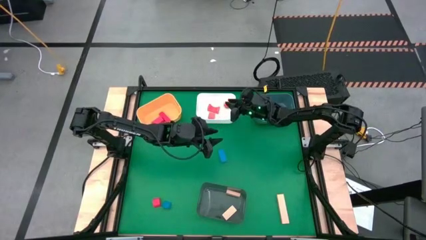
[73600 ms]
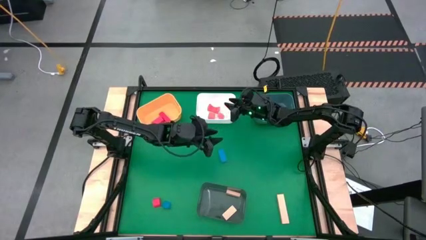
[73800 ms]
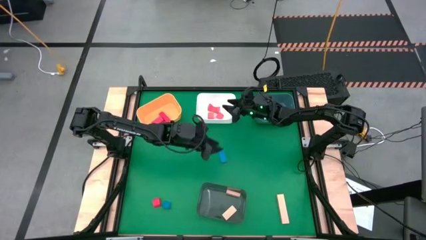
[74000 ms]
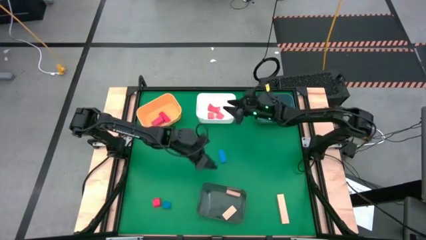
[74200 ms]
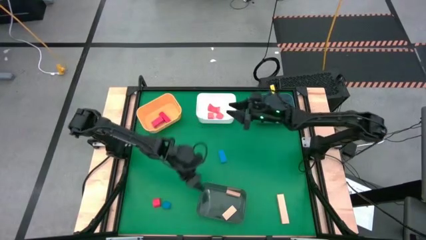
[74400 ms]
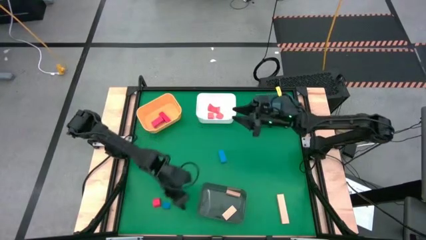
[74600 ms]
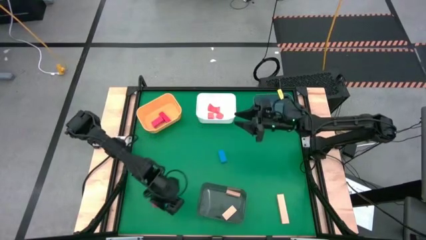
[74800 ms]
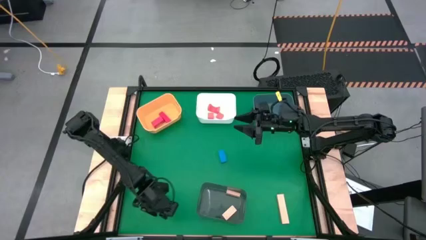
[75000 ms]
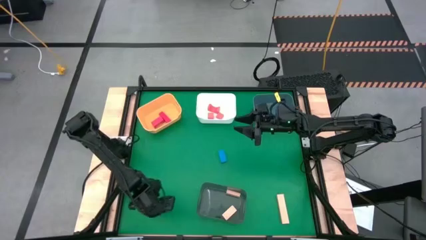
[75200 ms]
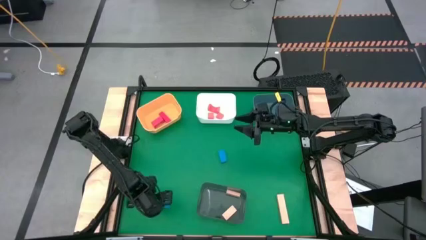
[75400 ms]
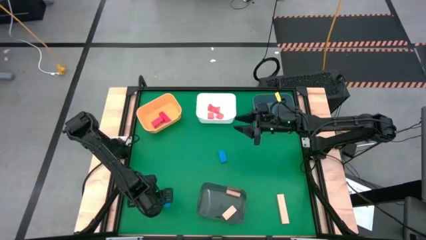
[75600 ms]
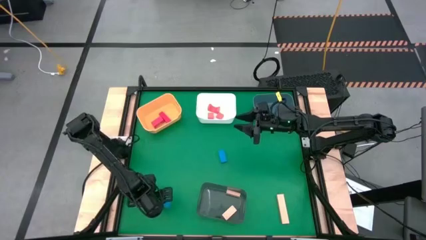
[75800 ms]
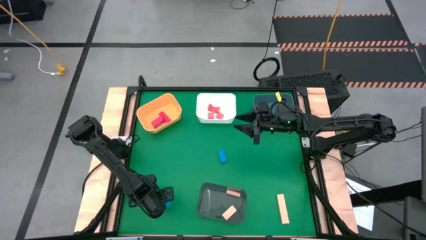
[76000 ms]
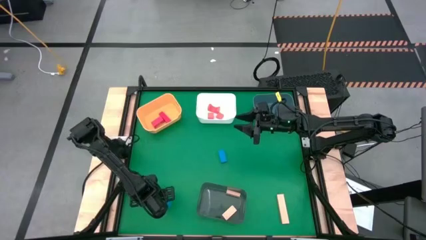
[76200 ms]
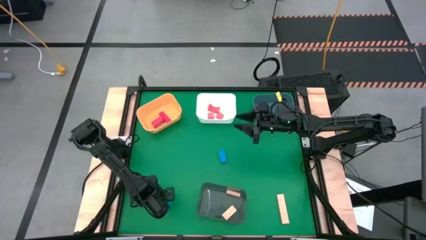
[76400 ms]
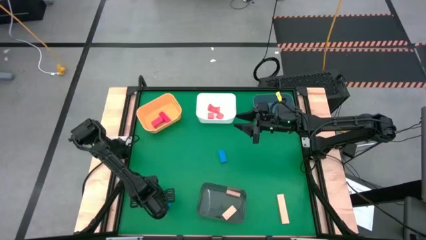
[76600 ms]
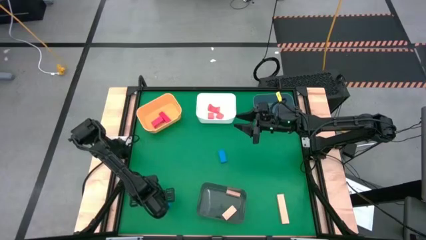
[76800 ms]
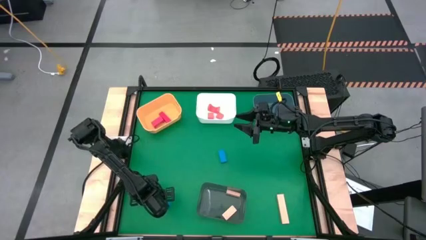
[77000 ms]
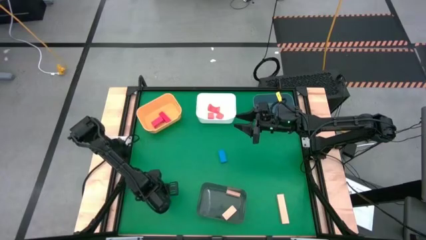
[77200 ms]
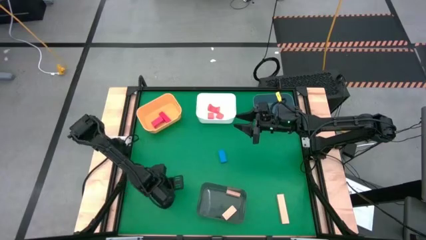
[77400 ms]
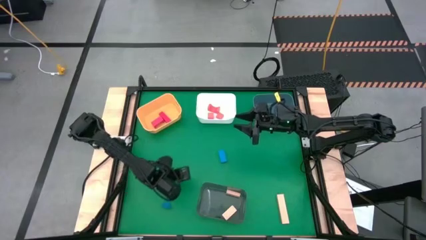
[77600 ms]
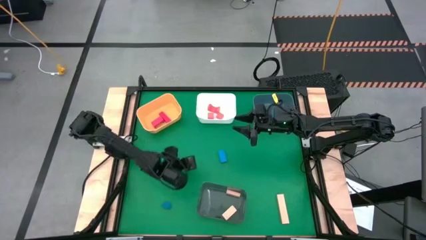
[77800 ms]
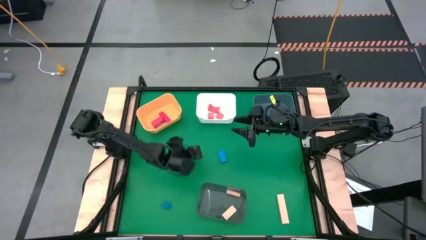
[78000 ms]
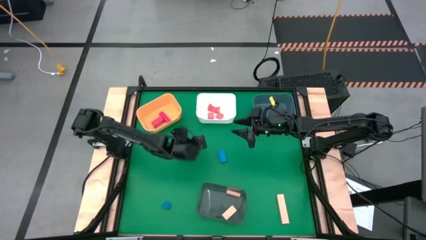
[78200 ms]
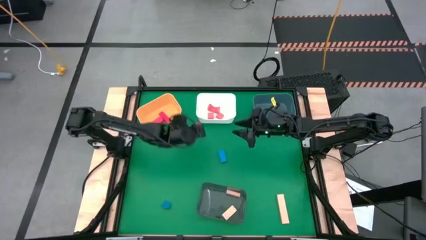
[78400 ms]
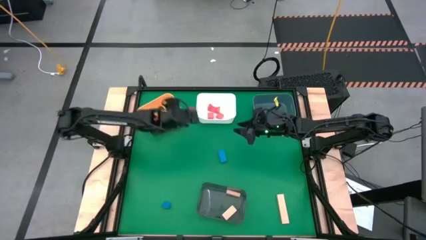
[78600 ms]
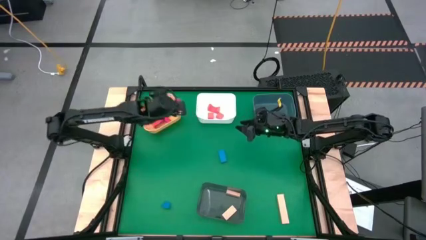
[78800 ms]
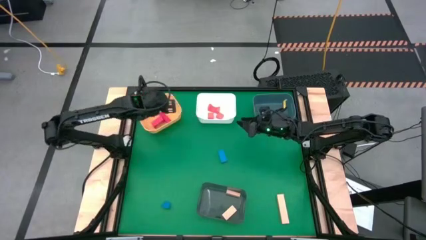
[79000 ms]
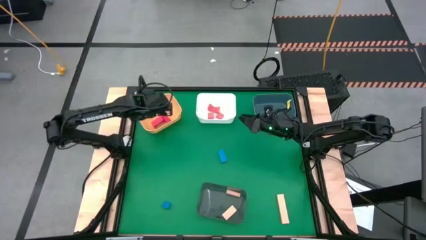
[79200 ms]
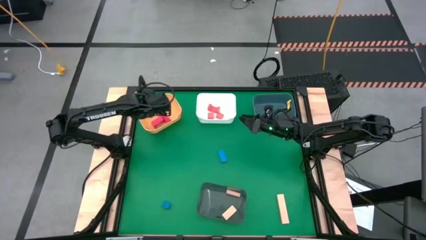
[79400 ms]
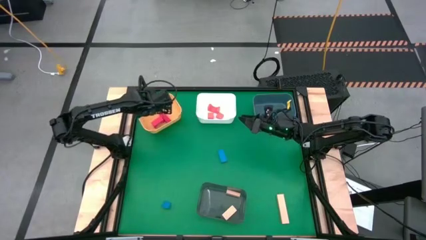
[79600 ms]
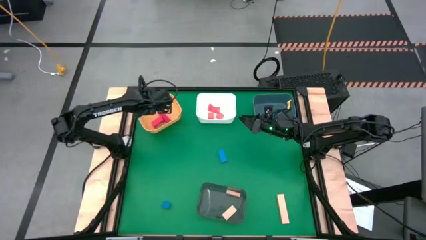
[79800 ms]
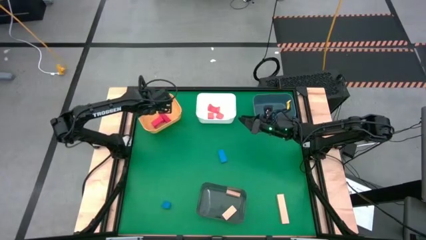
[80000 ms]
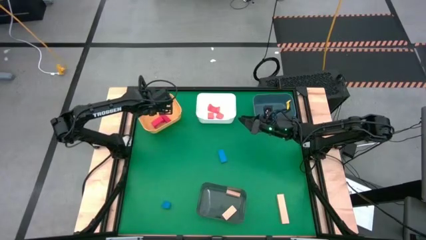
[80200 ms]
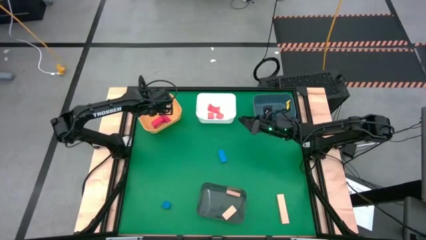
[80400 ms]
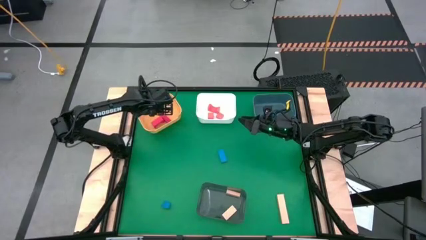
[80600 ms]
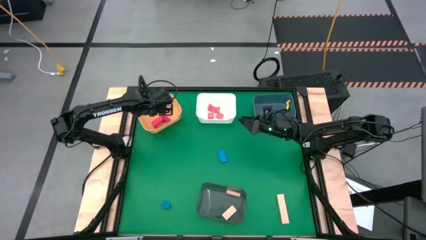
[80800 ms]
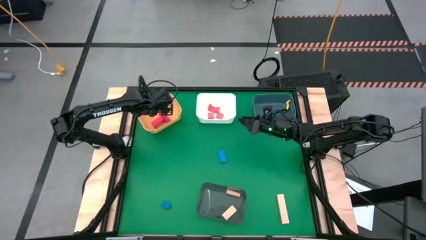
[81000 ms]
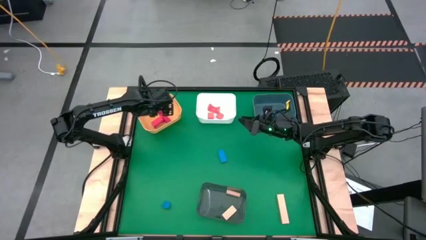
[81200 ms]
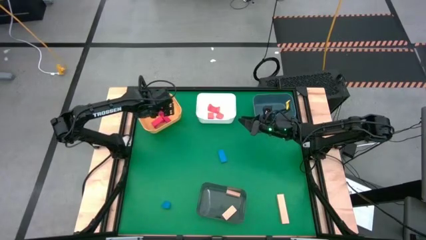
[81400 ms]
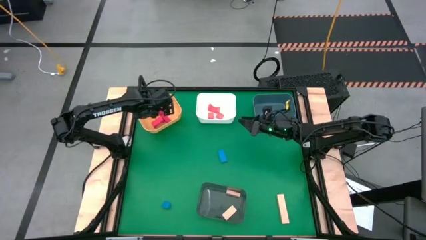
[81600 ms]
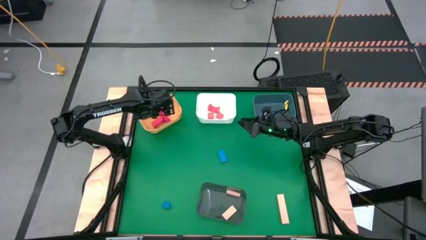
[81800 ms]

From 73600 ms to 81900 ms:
Task: Sort & place blocks by color
Put the red block into the yellow bin

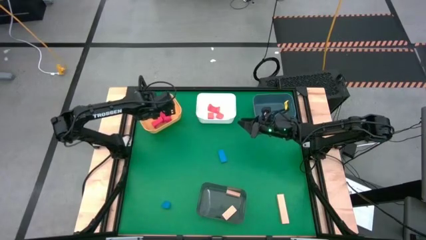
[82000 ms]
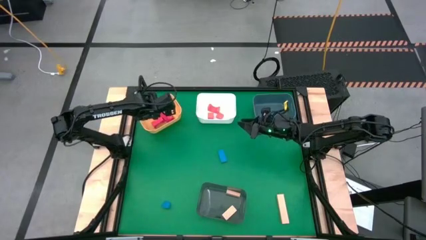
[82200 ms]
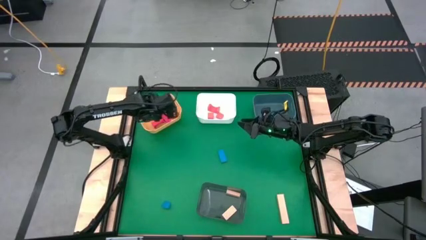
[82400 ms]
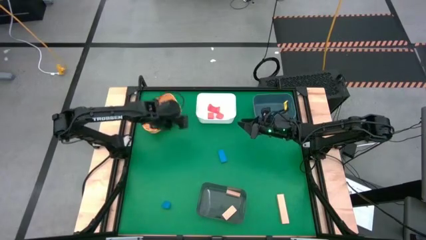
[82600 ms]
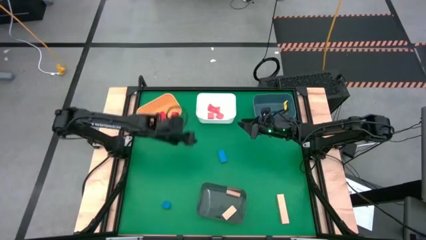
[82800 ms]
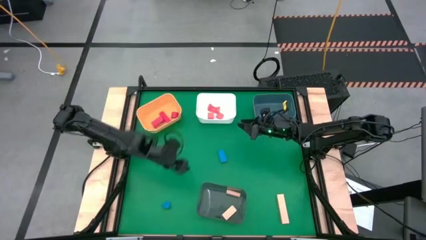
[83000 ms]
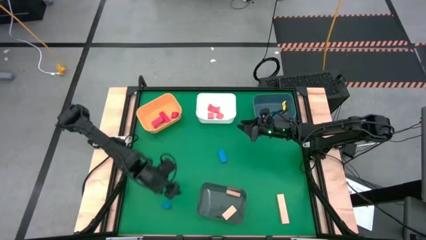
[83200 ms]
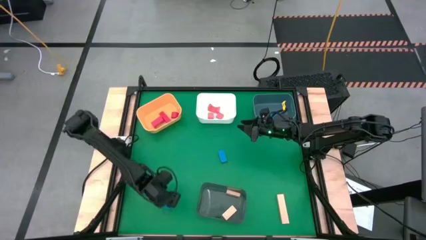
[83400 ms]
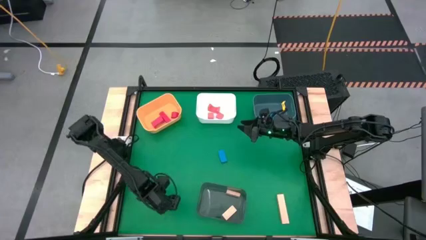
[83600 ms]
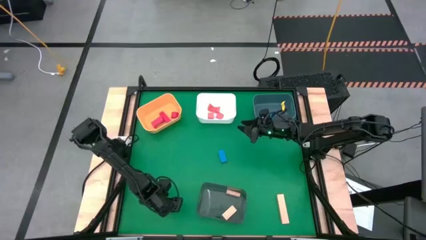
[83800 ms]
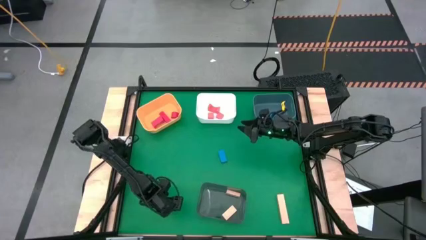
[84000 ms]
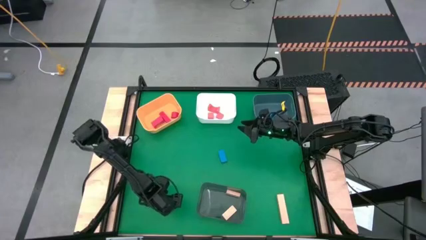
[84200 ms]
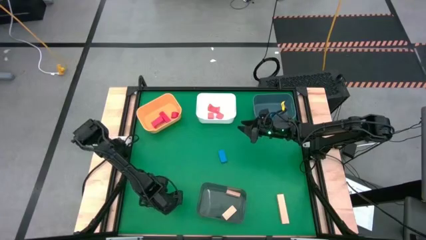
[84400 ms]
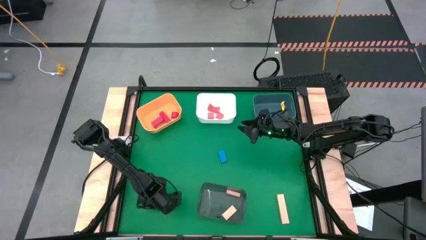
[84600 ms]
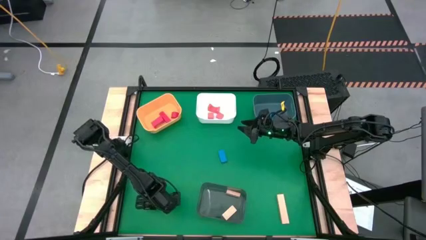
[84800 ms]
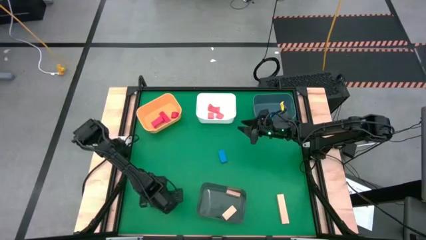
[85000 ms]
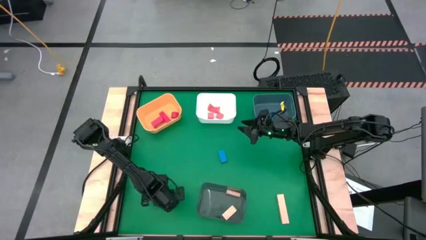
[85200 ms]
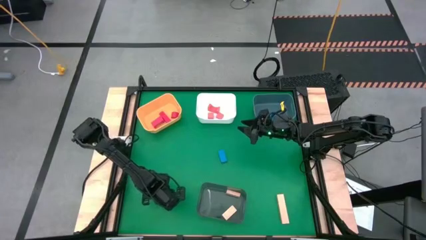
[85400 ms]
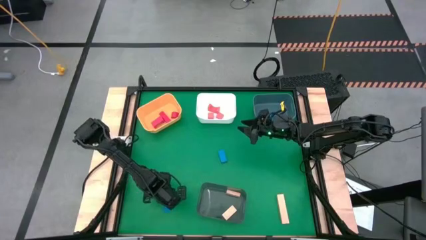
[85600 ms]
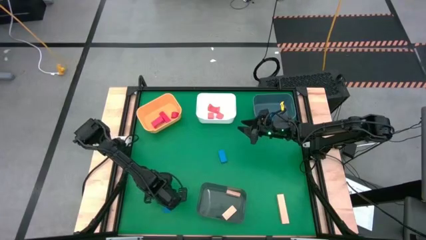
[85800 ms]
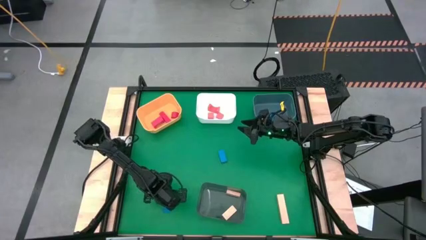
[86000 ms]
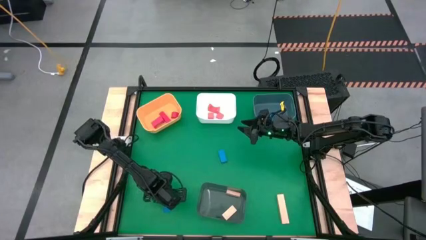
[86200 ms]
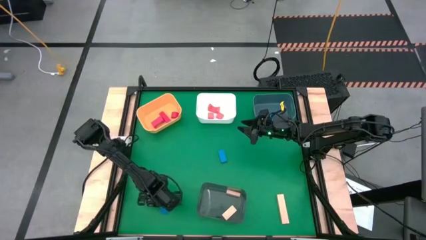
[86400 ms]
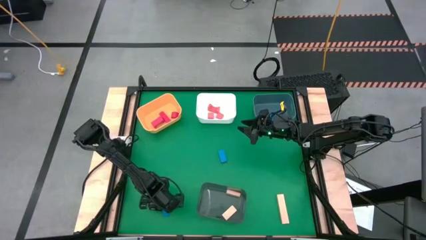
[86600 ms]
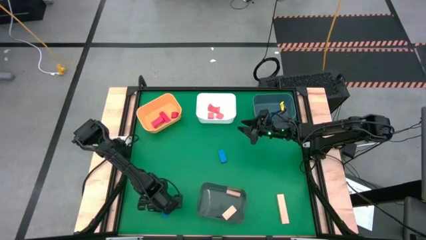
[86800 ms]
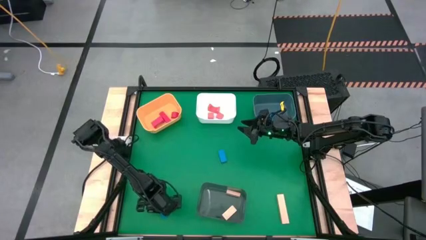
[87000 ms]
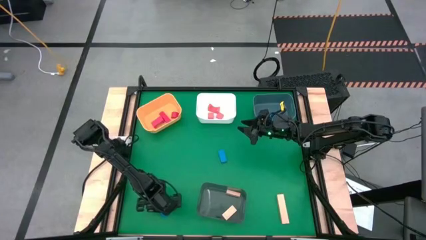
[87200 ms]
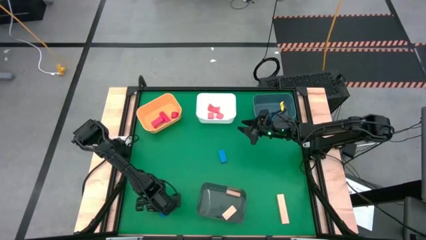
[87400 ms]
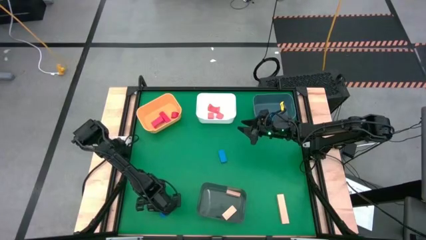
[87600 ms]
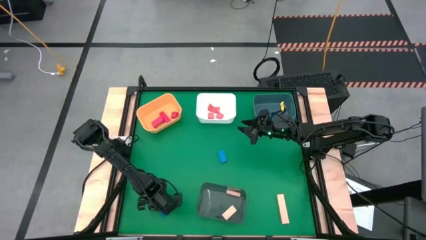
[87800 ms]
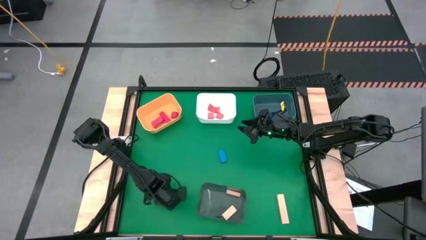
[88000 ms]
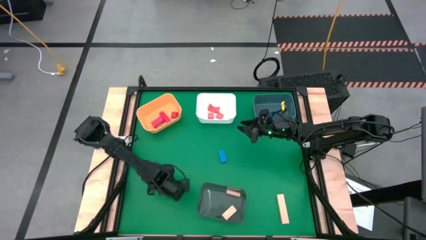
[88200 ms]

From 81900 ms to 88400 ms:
Put the blue block into the blue bin

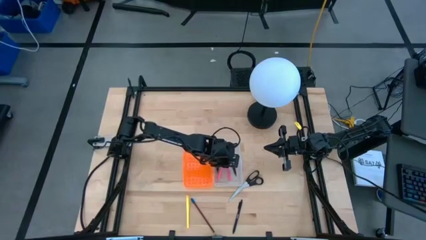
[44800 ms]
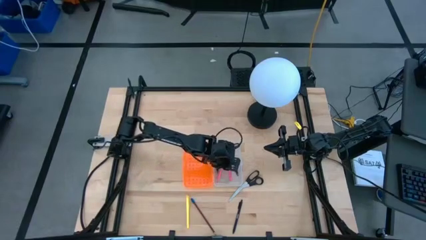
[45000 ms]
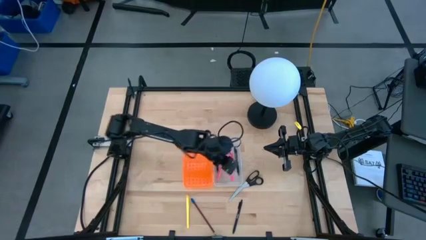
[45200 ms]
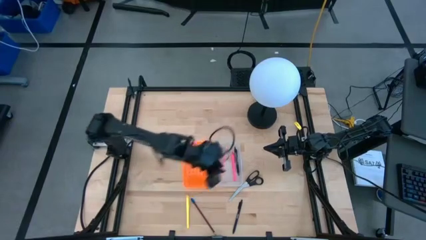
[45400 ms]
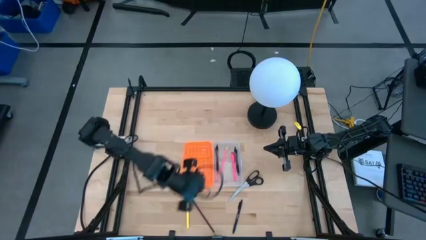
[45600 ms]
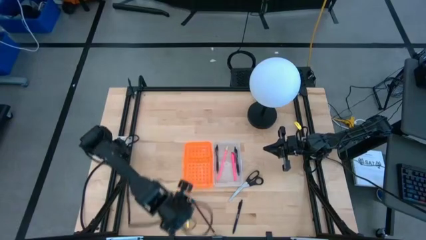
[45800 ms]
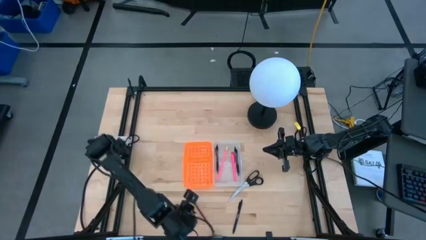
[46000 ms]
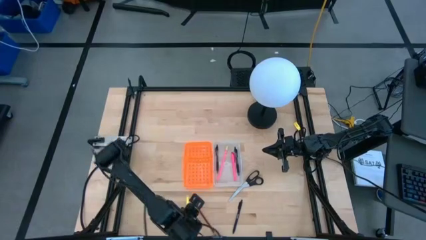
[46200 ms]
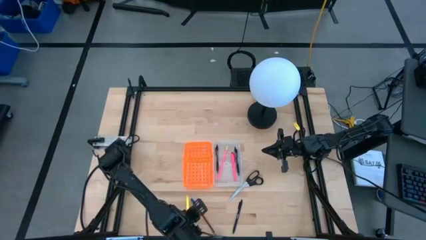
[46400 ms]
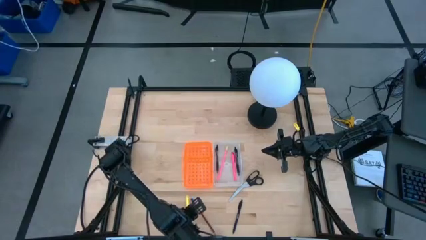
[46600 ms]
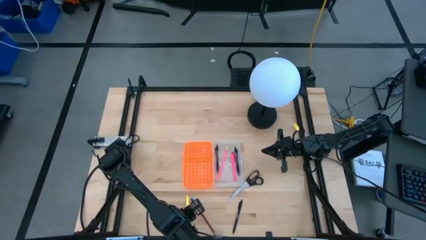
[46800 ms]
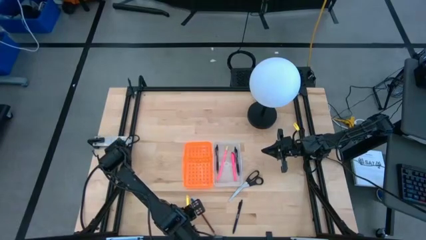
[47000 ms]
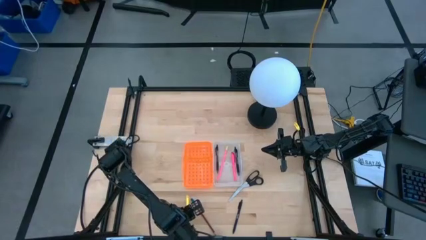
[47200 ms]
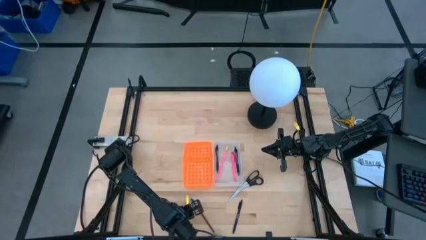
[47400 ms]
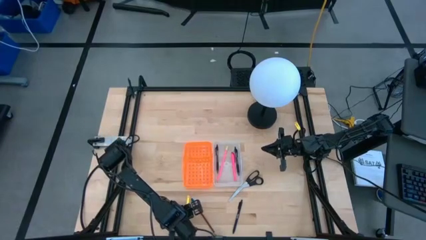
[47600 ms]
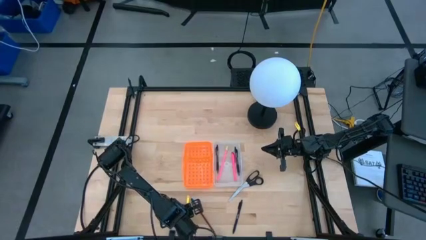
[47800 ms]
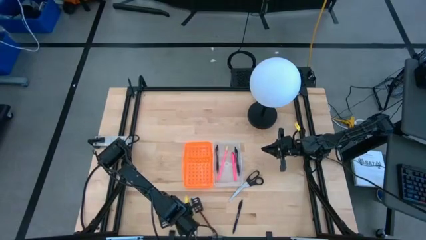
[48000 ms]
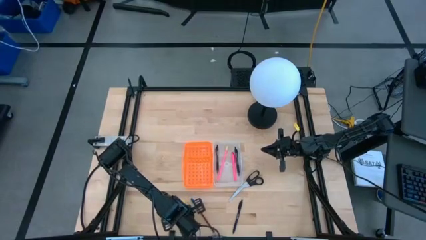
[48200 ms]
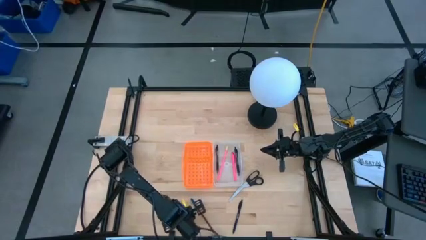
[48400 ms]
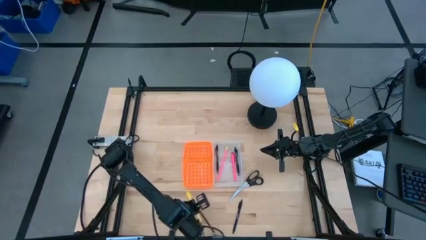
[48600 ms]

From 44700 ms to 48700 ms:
Task: Pick & place school supplies into a supply box
Put the yellow highlighter into the orange supply box
